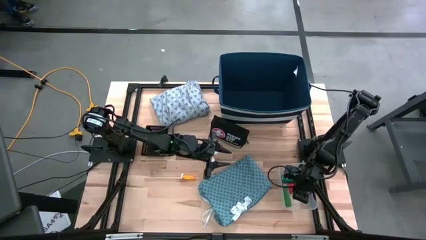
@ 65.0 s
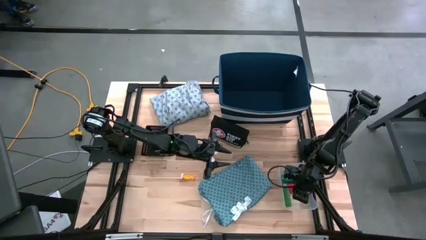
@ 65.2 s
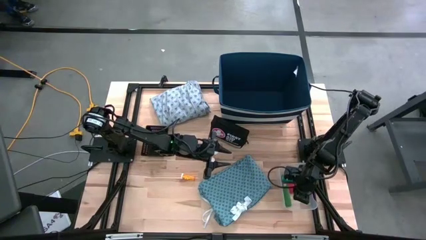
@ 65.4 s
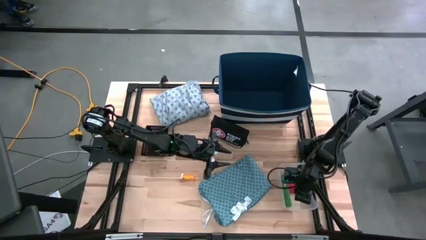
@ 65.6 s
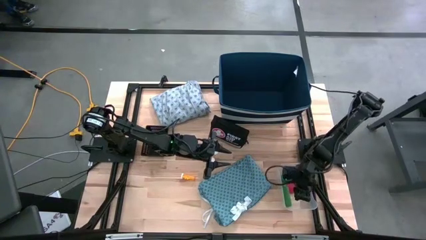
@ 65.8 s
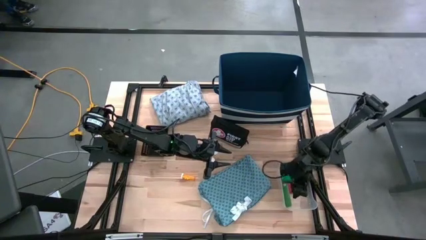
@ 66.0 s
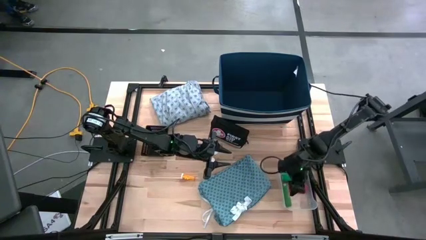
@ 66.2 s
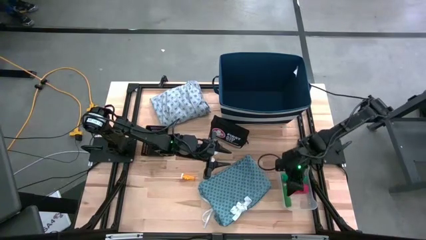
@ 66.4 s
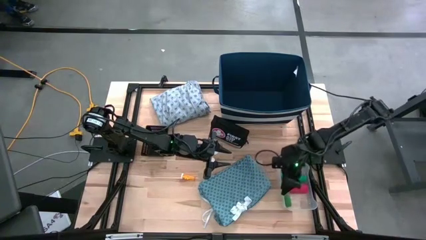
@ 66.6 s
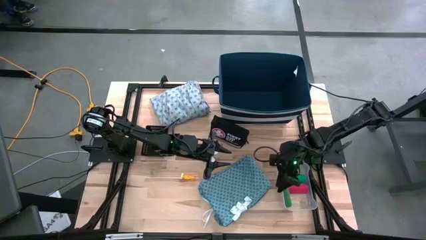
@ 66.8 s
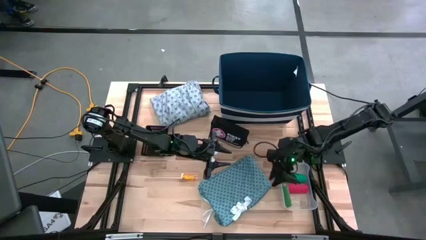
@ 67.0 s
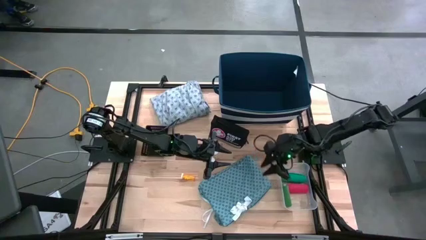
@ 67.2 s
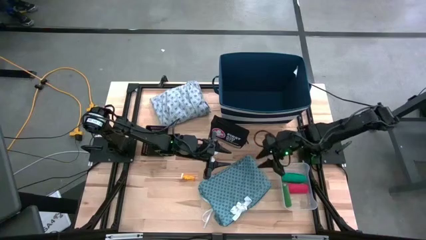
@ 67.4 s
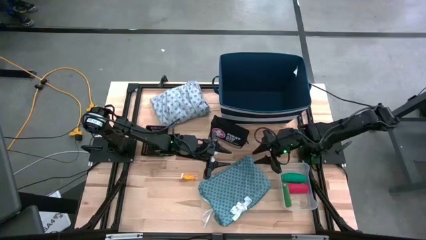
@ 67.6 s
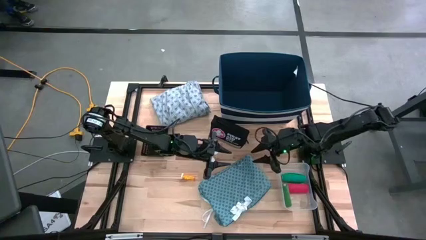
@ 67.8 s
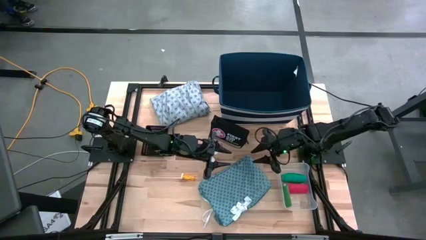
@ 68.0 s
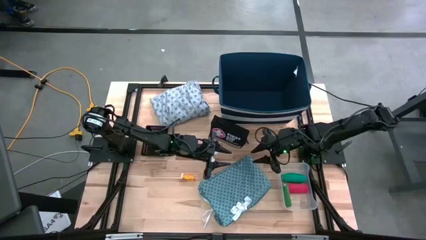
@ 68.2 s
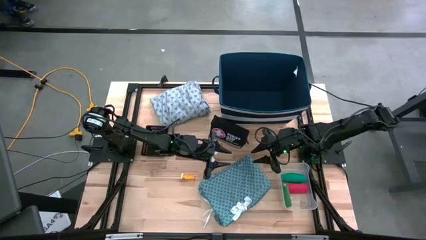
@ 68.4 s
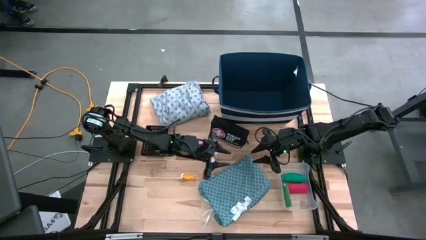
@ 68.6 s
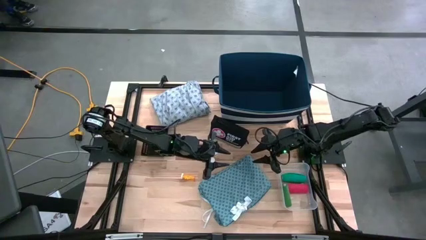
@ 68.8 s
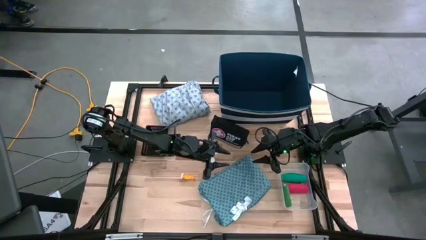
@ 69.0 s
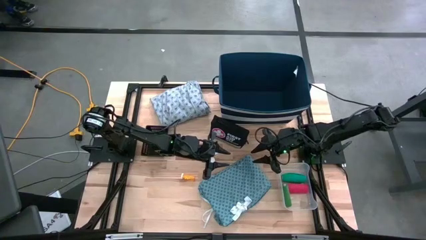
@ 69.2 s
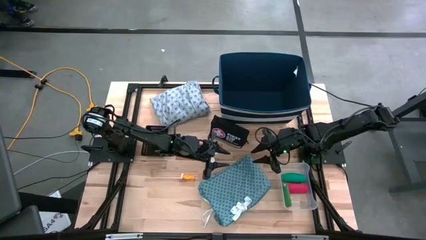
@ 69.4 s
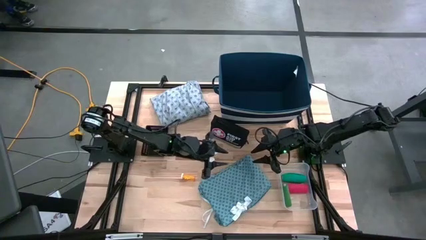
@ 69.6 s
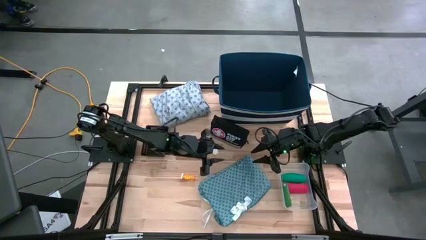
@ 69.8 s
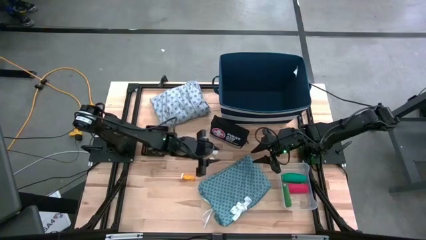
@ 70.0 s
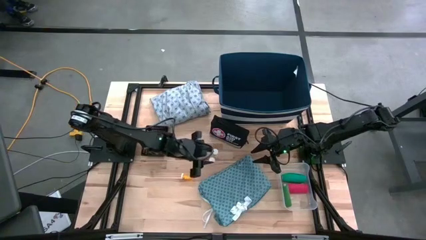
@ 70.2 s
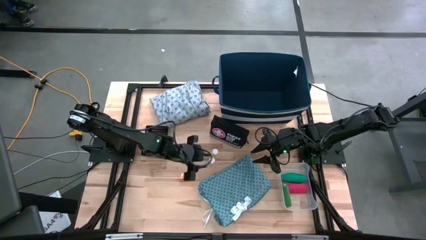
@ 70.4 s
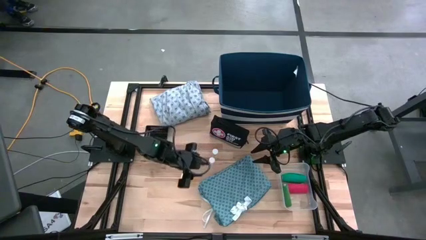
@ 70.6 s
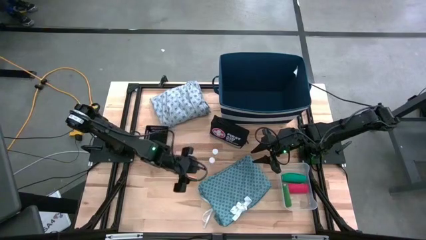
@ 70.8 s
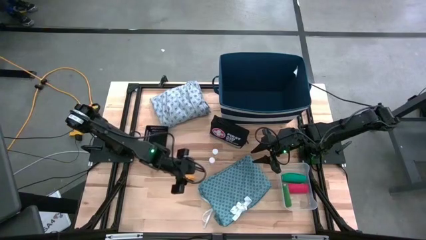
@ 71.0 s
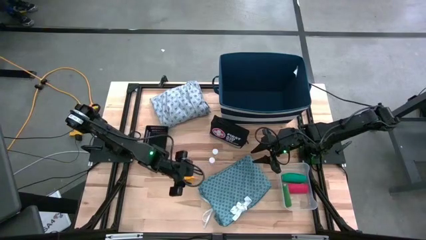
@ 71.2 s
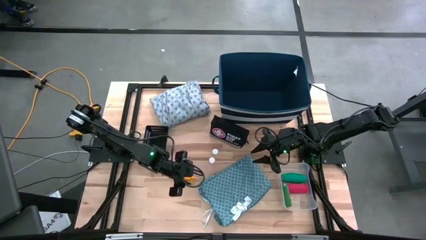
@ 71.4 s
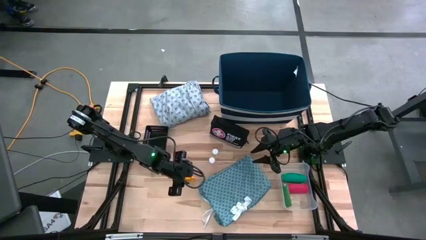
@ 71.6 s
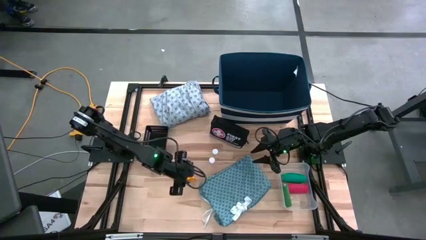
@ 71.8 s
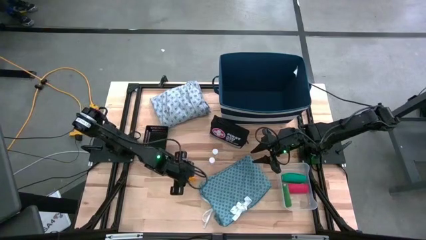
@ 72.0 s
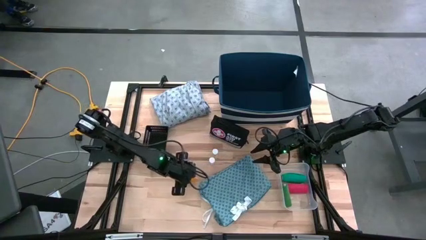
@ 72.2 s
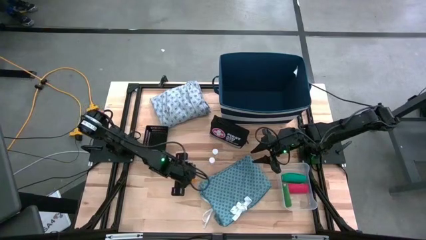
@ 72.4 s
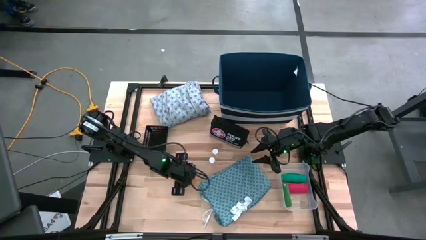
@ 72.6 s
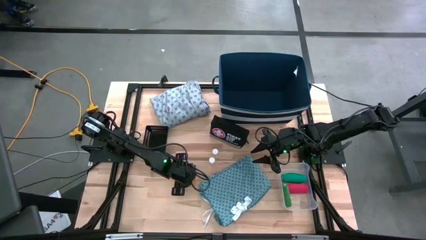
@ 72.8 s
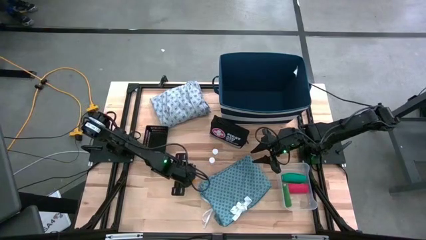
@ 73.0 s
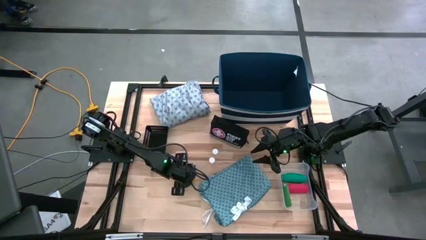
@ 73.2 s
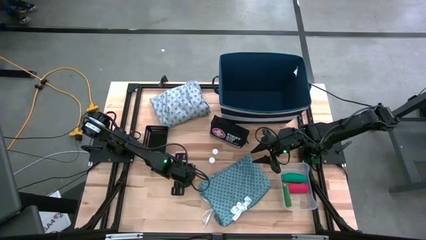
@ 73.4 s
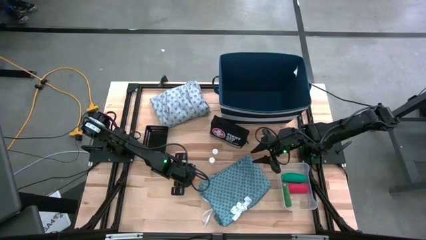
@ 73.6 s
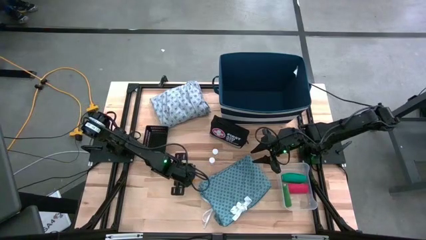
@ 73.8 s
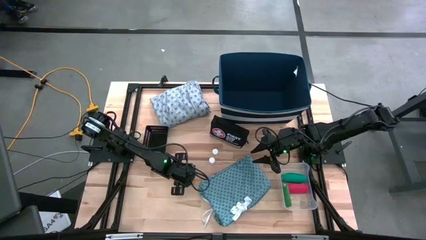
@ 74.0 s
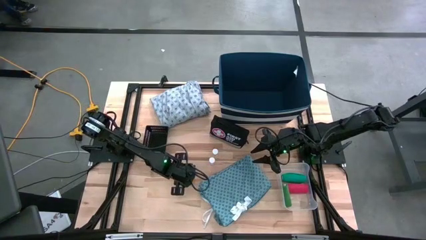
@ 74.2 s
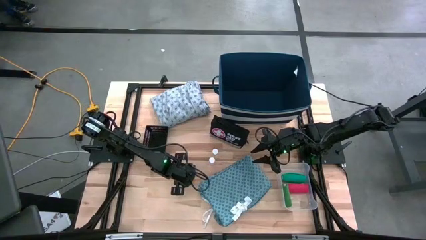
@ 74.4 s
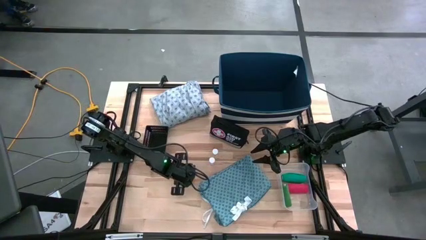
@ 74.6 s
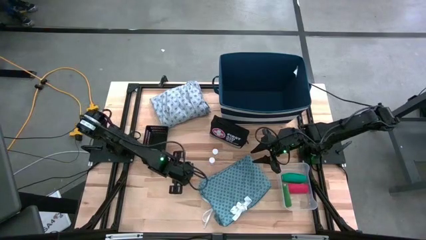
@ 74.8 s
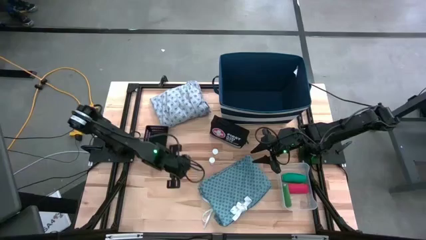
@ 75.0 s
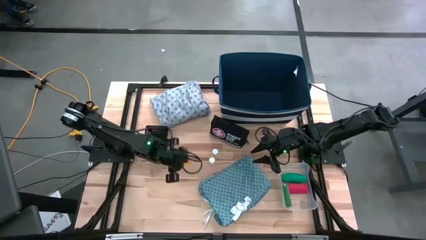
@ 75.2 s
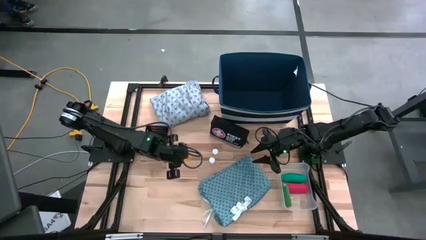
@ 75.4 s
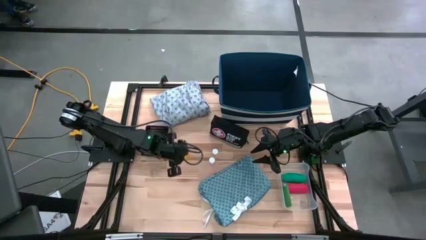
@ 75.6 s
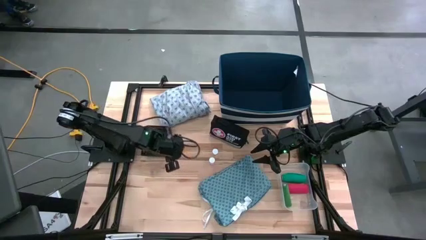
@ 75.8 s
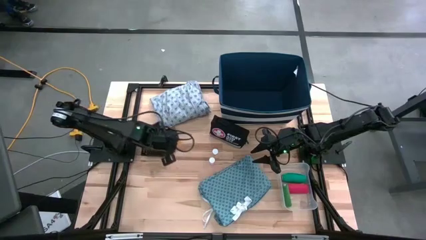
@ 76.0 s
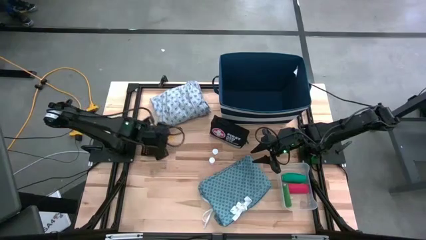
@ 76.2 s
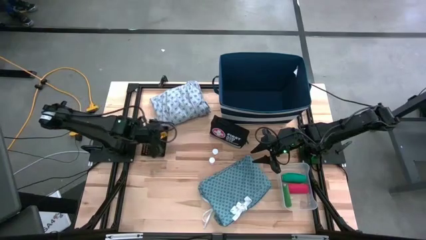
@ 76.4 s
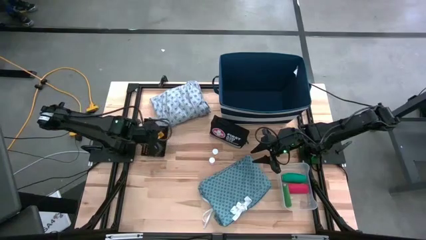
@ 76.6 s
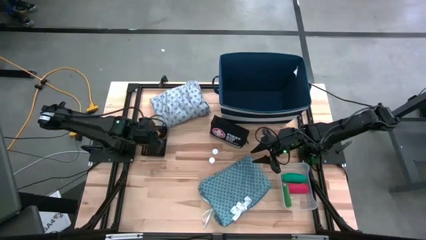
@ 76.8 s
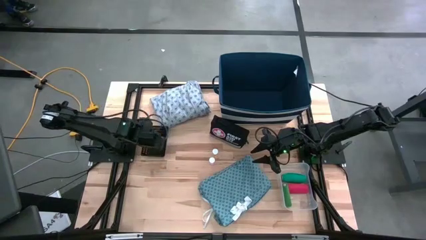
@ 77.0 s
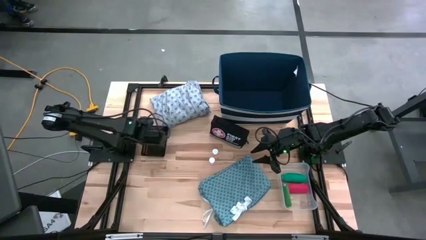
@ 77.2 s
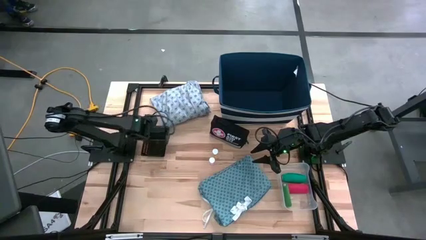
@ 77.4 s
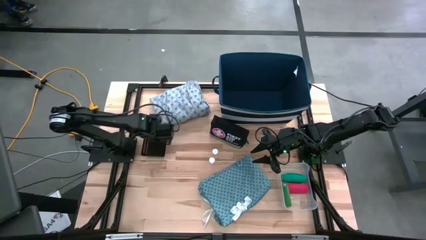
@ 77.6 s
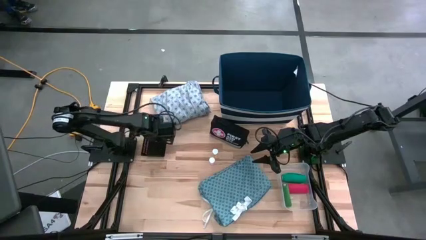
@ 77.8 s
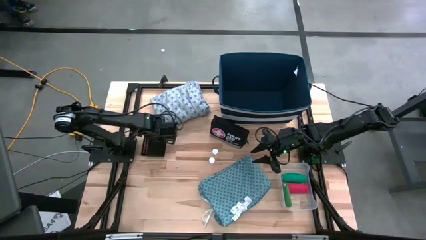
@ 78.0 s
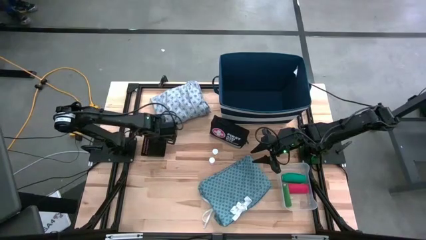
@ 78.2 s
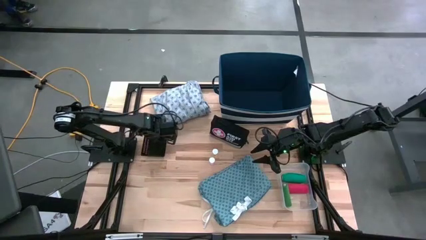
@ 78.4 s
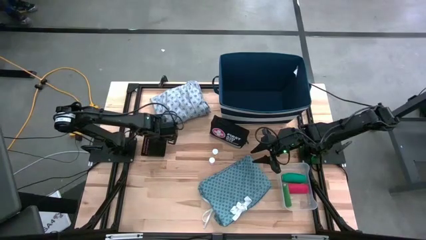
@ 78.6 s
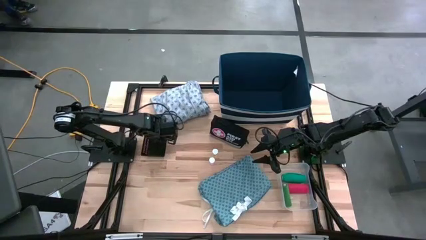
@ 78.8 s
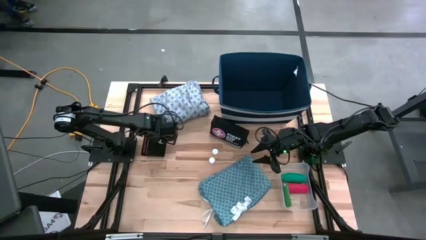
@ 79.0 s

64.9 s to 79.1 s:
Task: Pick & place medical supplies in basket/bin
Put the orange pill bottle into the black bin
